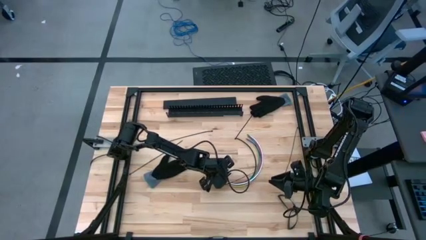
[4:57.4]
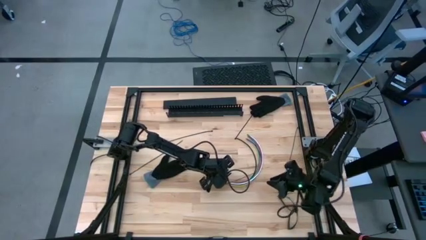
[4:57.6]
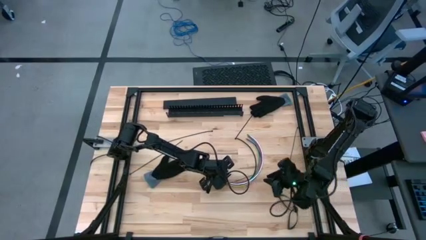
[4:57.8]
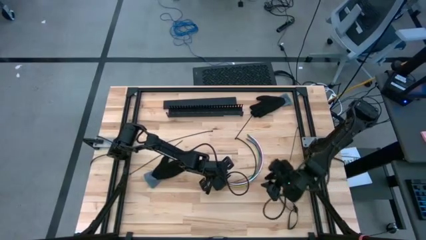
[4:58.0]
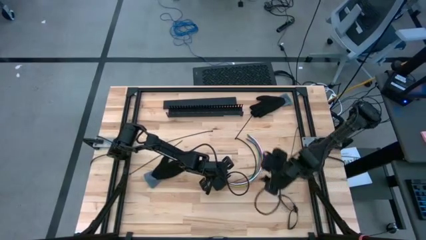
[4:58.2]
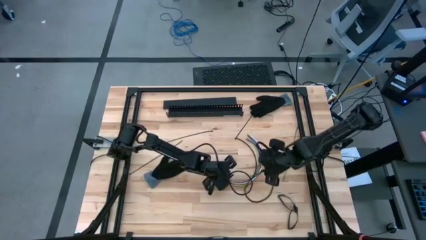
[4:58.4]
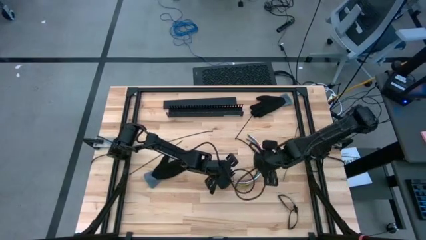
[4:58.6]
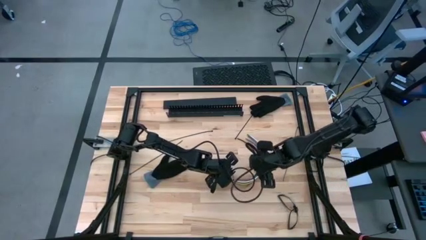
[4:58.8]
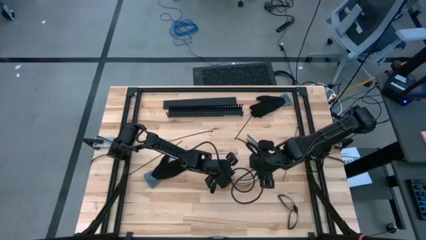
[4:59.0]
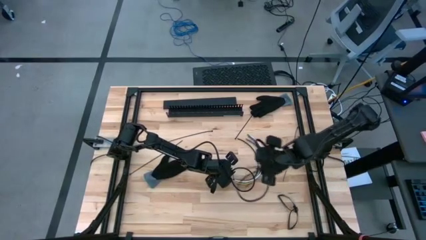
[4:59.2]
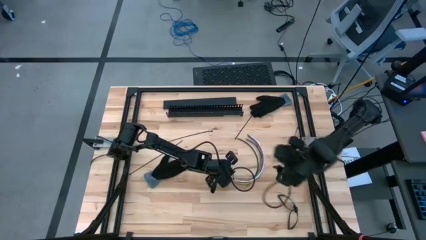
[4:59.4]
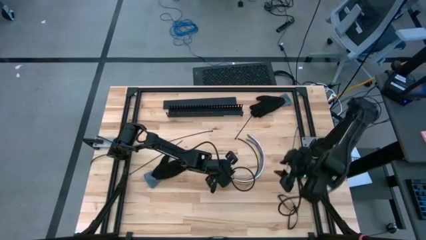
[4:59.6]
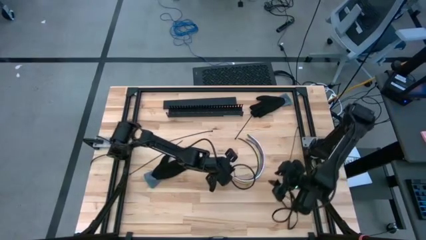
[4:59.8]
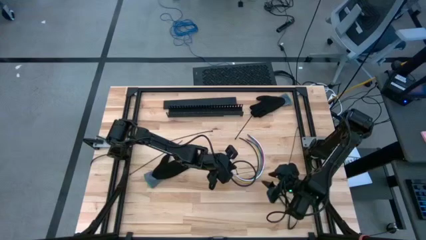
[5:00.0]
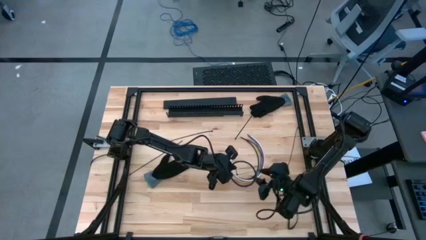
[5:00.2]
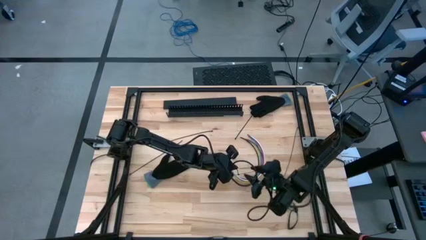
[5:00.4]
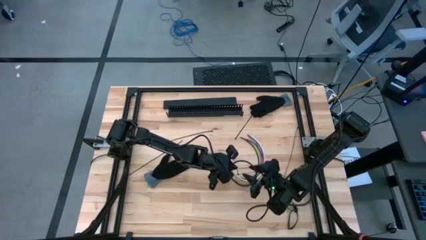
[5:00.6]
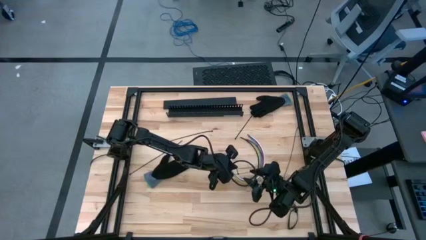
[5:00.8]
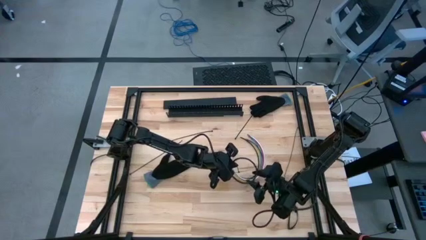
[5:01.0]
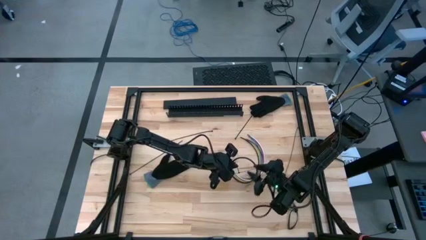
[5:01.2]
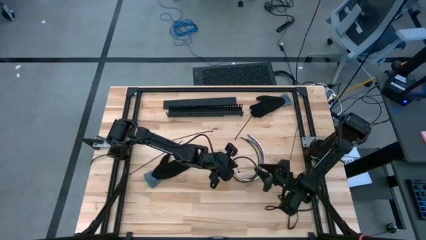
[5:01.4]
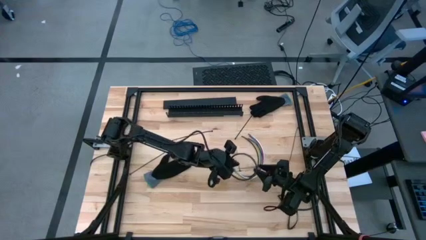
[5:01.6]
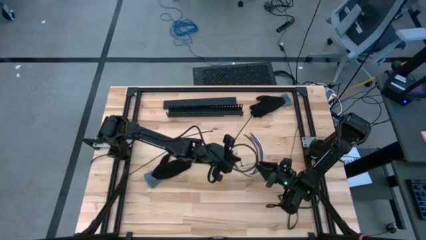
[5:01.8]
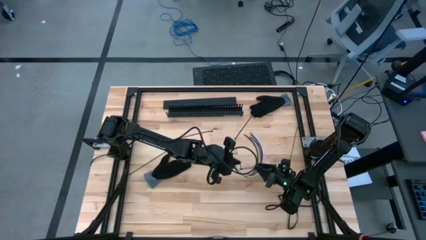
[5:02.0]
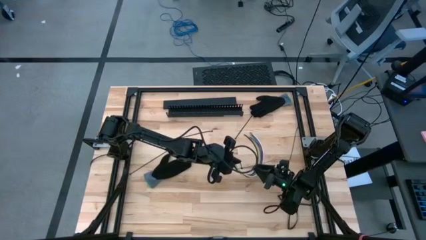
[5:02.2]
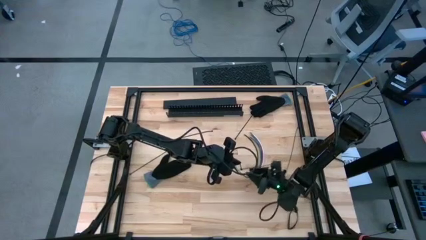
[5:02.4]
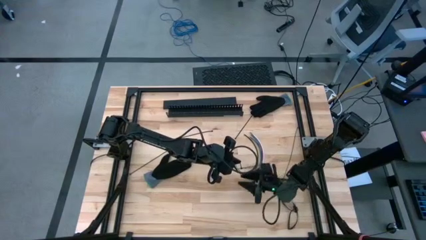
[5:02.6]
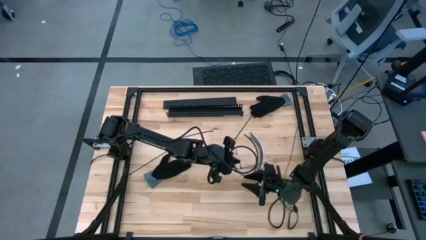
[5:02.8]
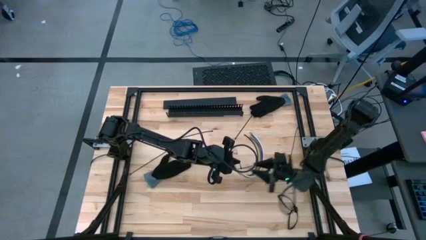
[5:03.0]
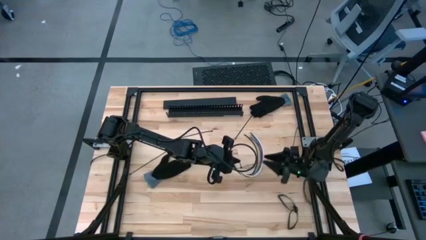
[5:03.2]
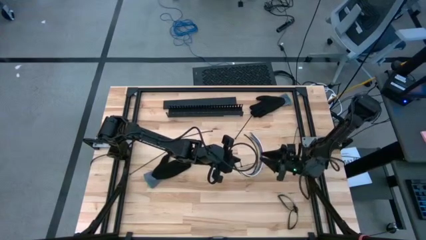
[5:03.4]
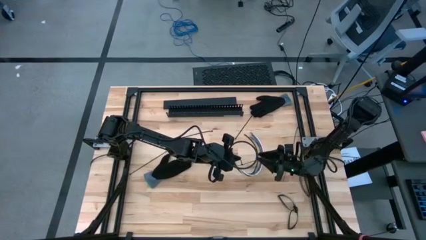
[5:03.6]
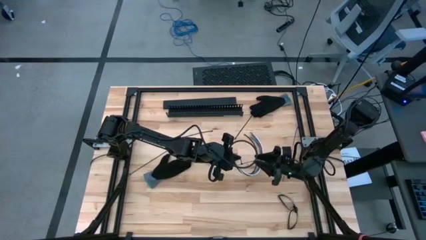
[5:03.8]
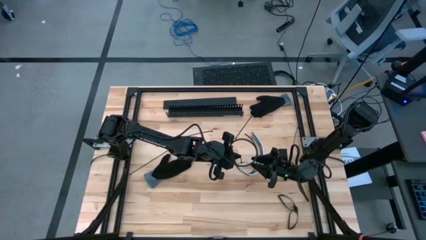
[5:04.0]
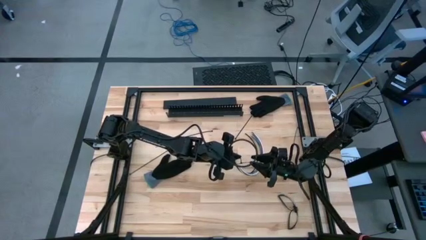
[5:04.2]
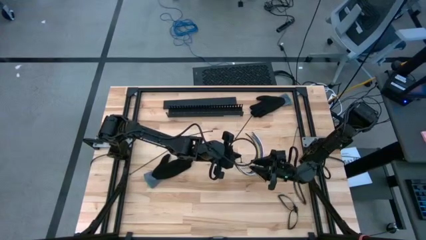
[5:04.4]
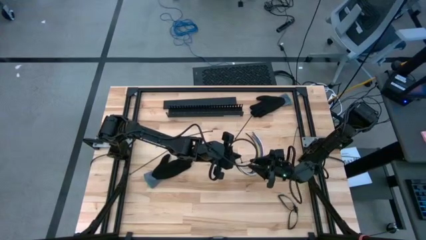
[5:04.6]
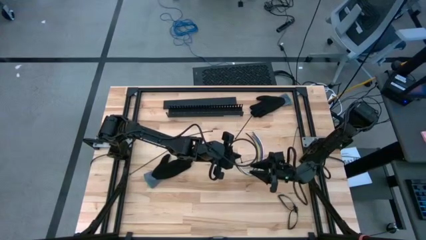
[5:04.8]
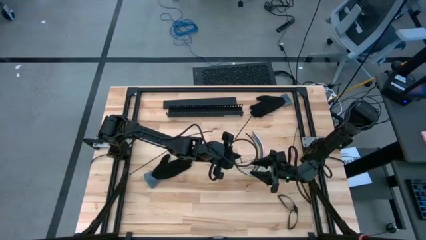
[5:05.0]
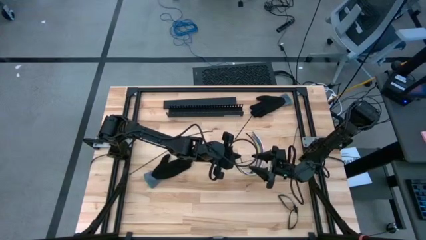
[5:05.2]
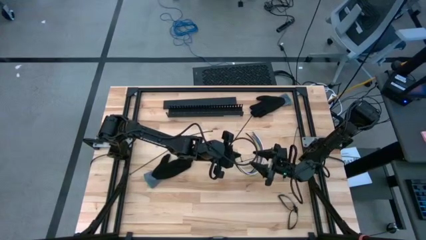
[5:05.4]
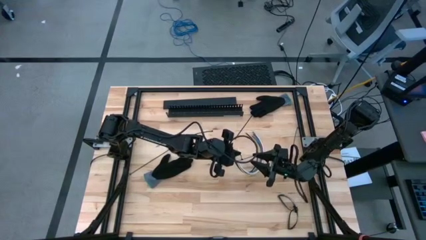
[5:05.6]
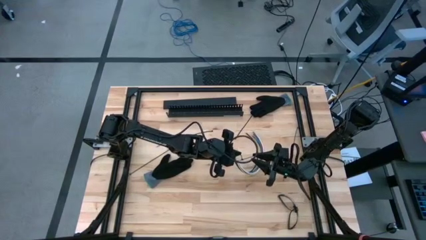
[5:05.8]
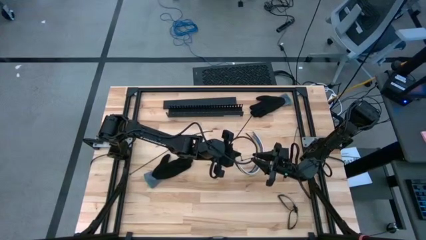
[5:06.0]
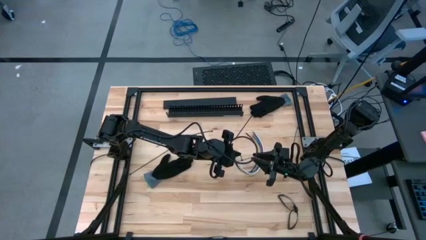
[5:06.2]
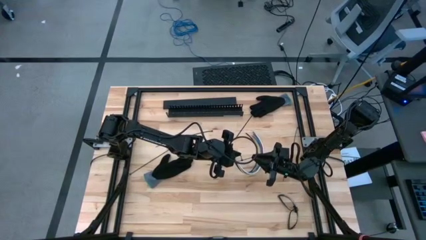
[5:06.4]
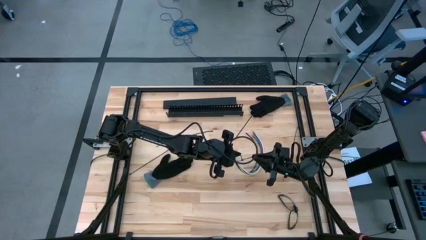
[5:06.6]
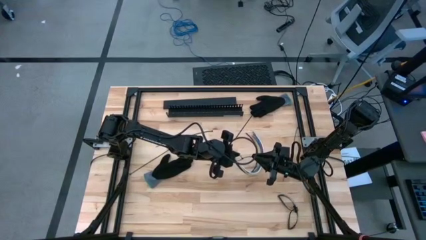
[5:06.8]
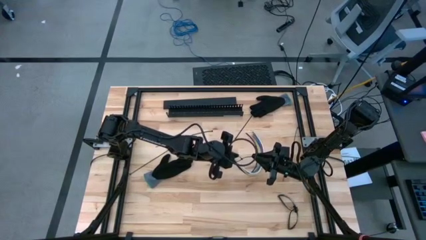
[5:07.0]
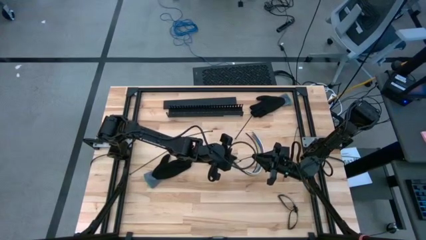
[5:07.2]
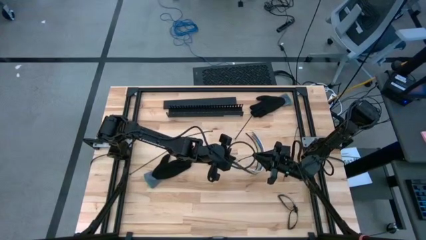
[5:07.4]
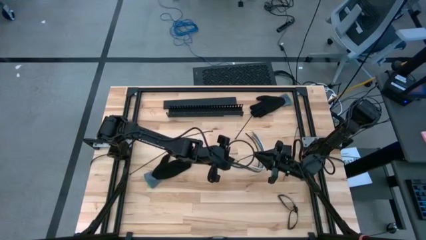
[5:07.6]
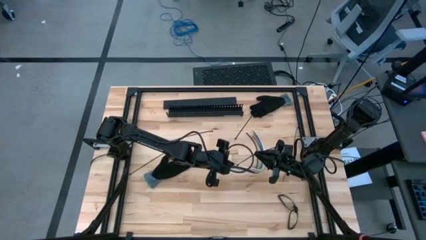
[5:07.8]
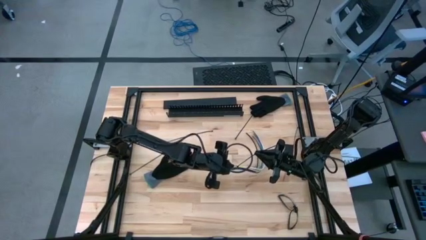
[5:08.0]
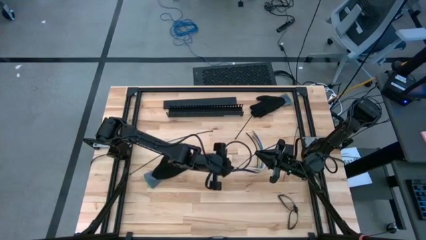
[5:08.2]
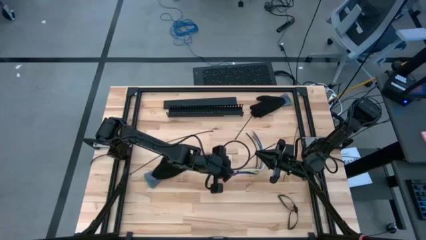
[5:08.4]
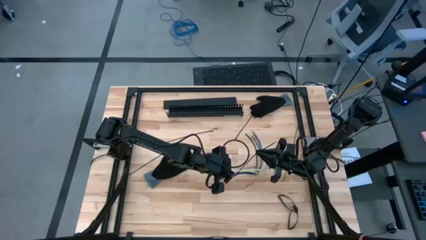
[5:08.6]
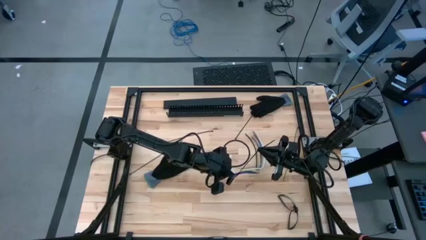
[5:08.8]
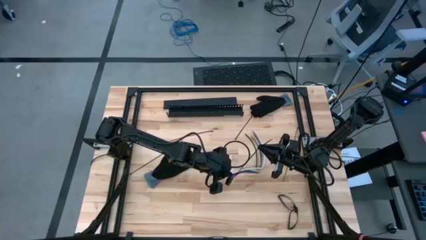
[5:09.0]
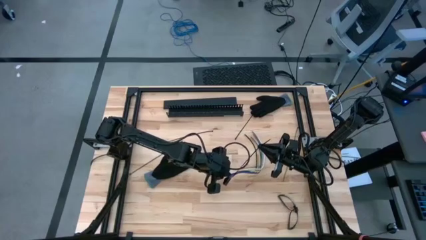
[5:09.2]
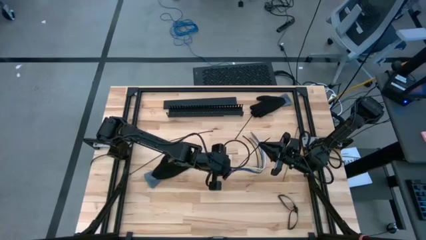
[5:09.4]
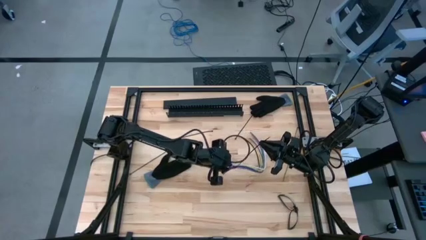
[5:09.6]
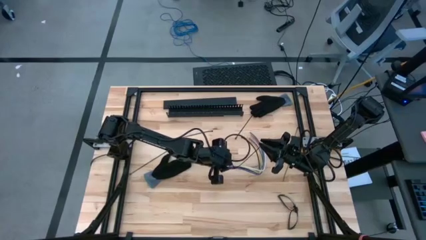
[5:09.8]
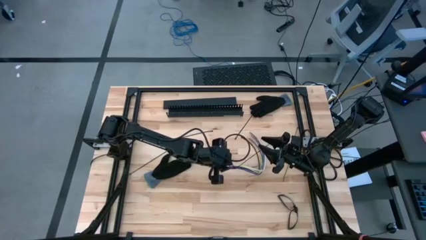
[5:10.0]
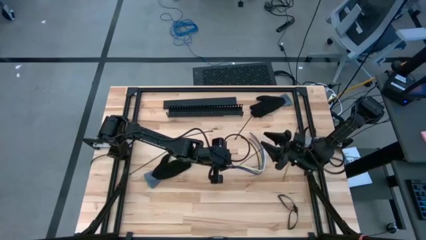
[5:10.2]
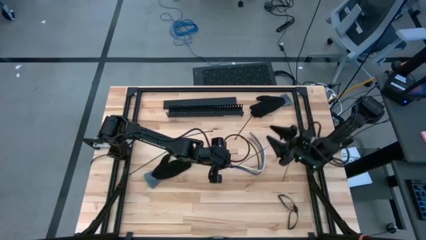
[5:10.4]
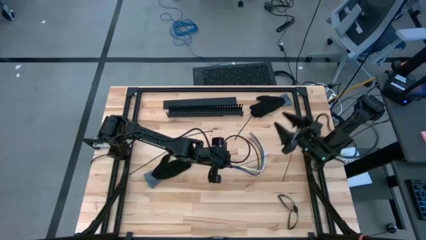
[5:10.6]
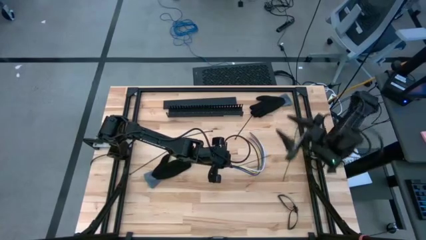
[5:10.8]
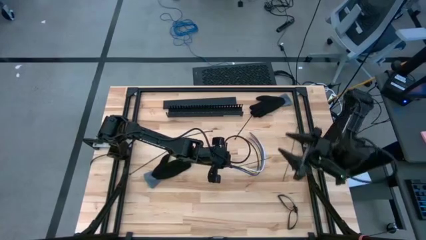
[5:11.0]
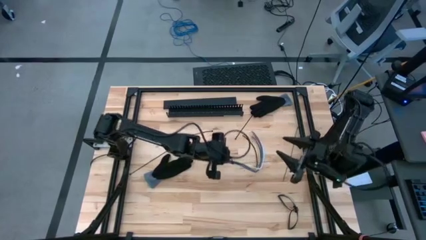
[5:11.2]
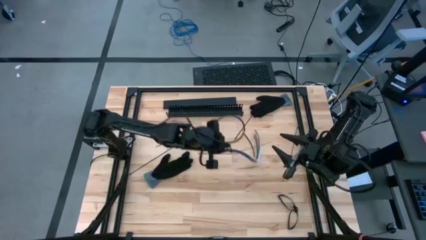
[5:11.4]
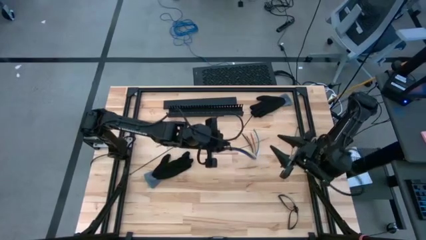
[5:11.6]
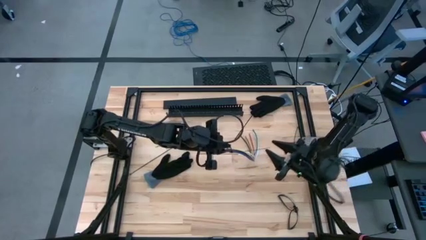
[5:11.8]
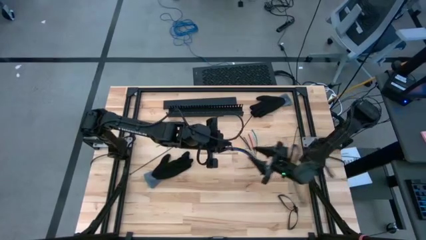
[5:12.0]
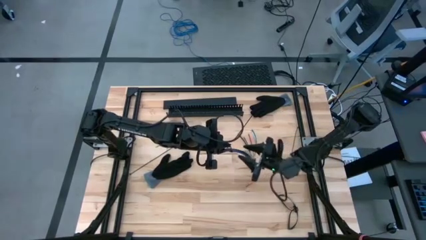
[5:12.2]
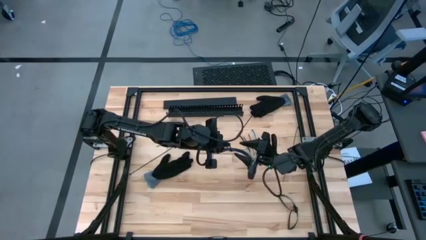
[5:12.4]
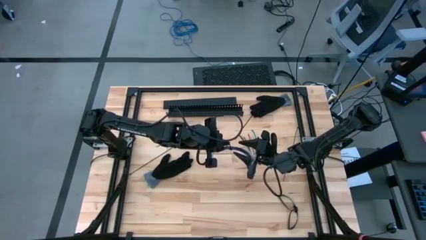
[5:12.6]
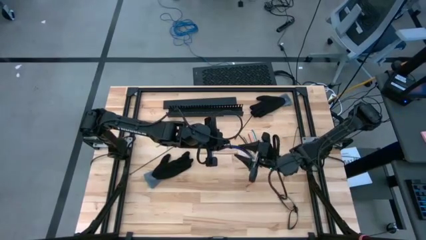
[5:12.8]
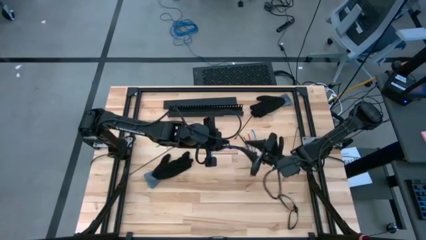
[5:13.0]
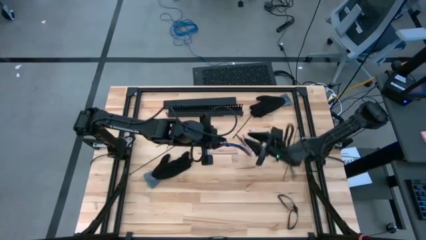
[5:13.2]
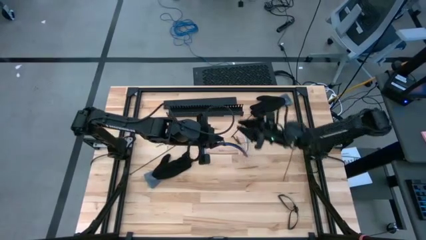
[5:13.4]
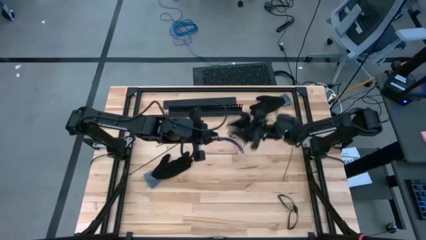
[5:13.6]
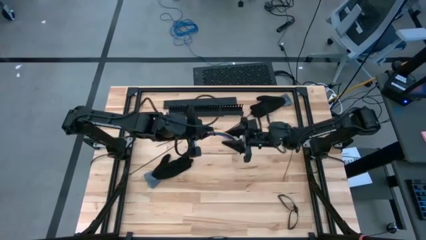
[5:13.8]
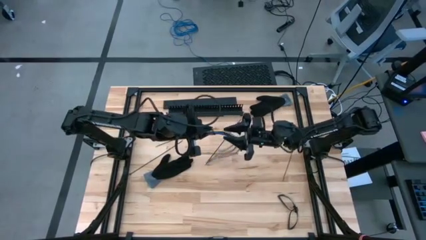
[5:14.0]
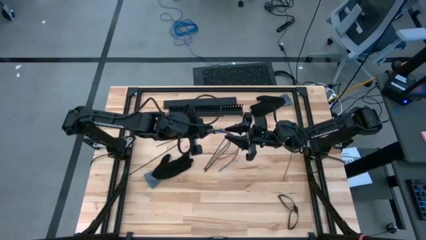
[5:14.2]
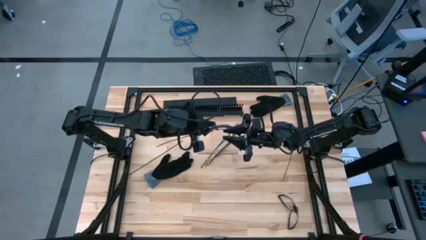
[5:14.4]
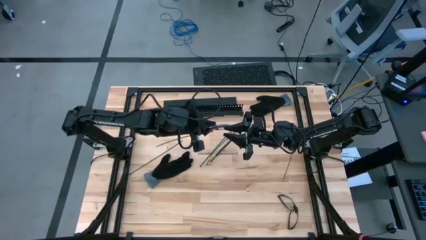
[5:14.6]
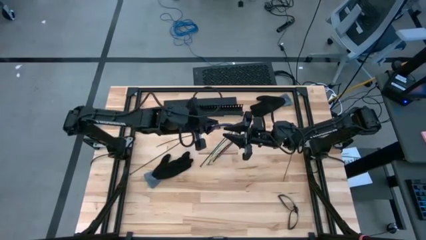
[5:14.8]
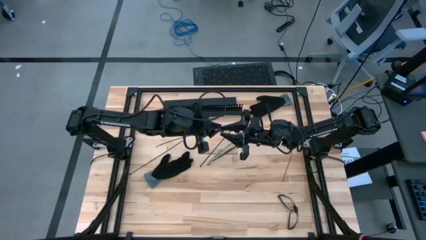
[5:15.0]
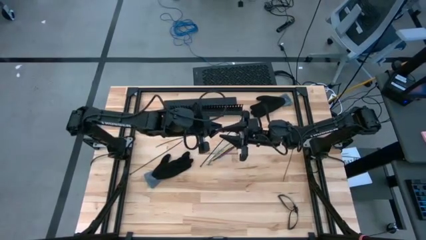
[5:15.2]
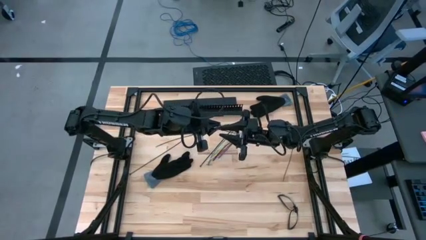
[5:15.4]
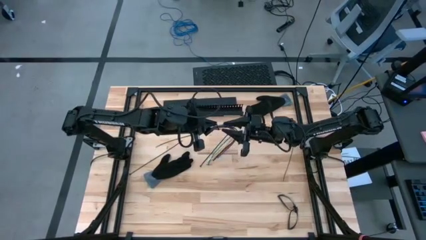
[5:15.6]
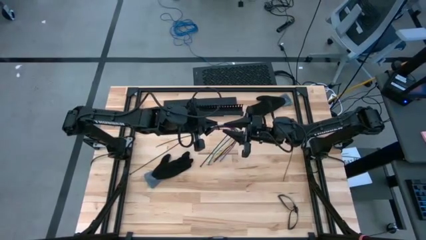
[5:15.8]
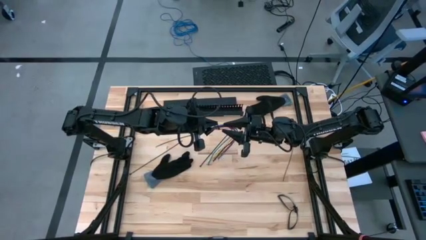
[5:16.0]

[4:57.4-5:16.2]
Task: Ziptie cables
Wrap the cable wires using a zip tie
